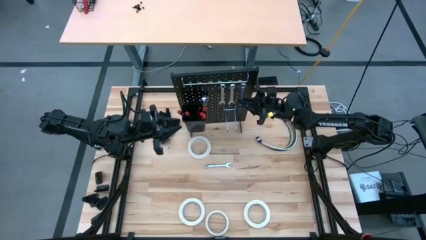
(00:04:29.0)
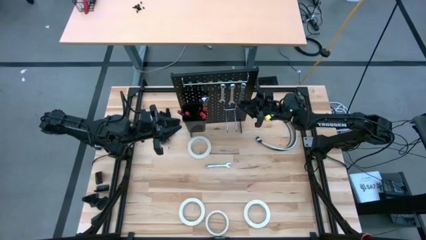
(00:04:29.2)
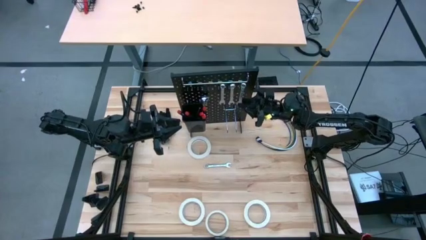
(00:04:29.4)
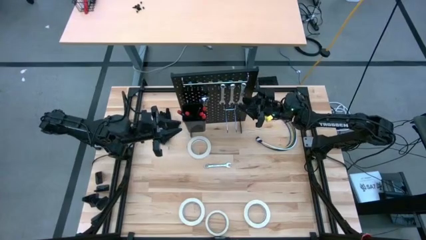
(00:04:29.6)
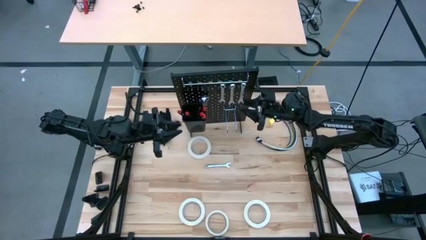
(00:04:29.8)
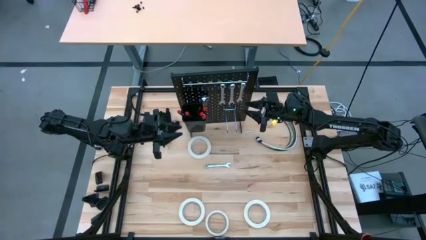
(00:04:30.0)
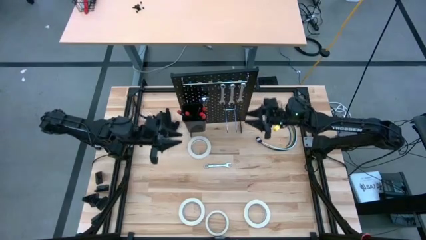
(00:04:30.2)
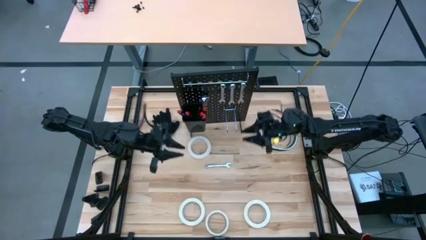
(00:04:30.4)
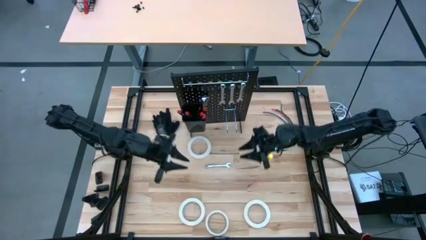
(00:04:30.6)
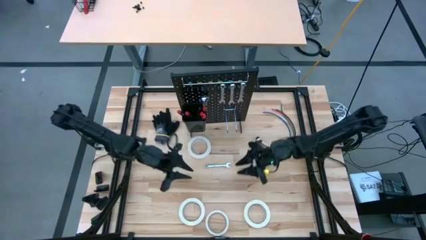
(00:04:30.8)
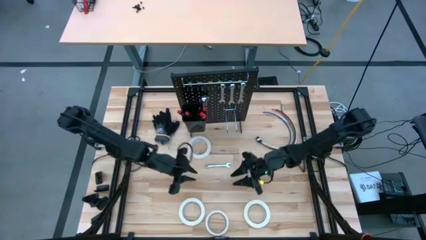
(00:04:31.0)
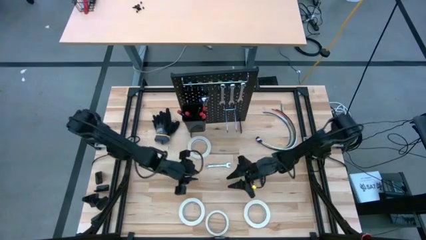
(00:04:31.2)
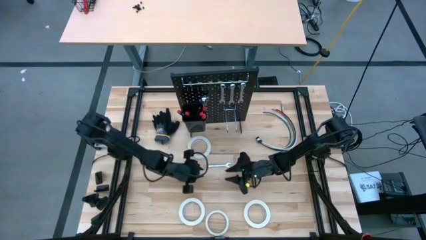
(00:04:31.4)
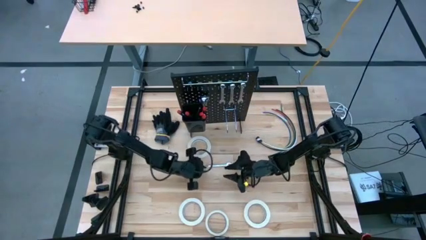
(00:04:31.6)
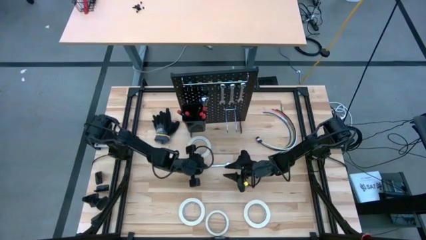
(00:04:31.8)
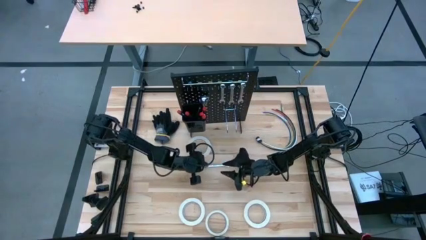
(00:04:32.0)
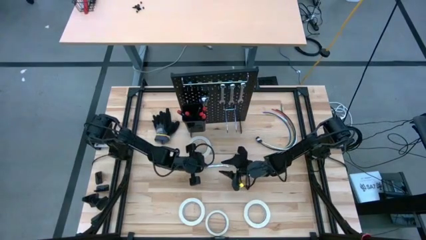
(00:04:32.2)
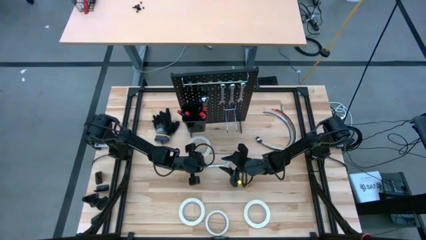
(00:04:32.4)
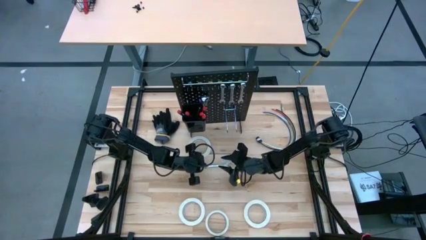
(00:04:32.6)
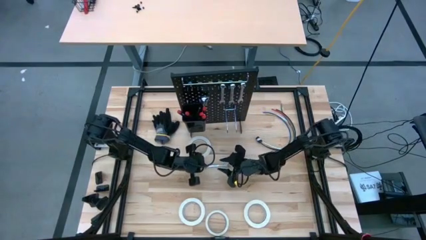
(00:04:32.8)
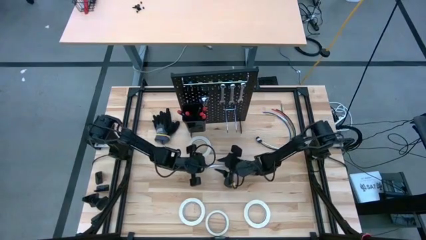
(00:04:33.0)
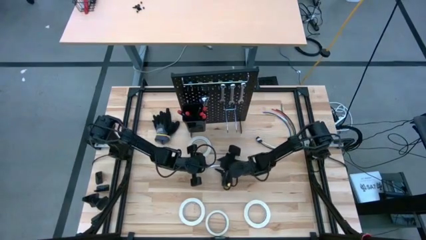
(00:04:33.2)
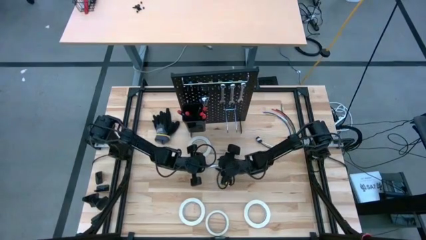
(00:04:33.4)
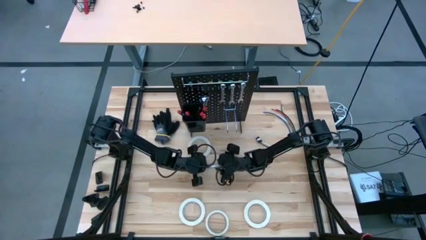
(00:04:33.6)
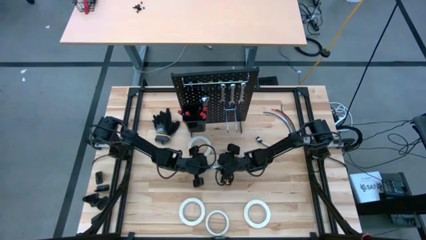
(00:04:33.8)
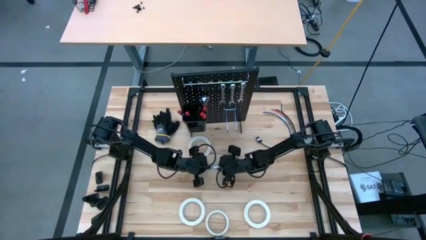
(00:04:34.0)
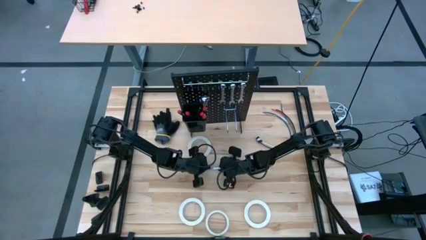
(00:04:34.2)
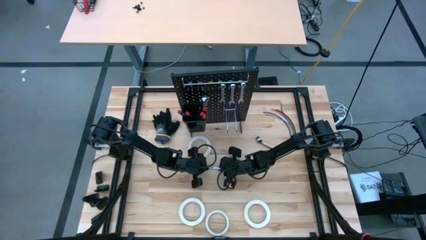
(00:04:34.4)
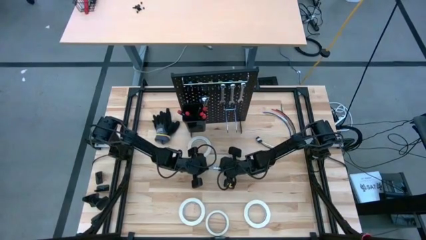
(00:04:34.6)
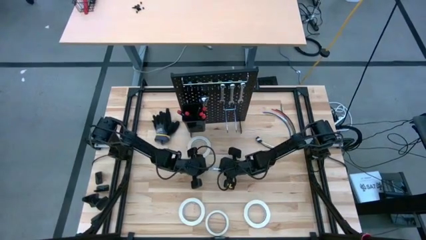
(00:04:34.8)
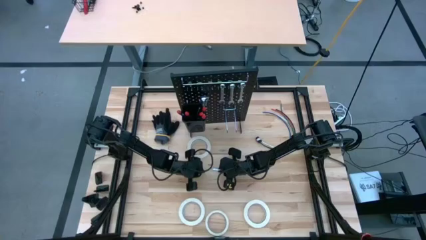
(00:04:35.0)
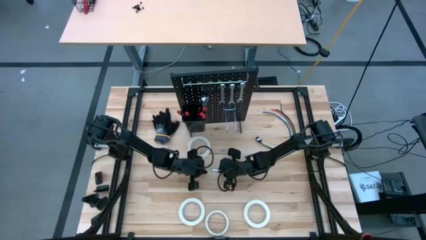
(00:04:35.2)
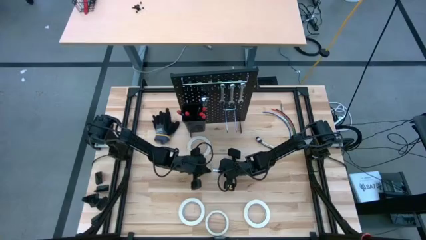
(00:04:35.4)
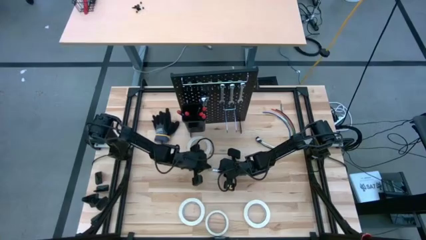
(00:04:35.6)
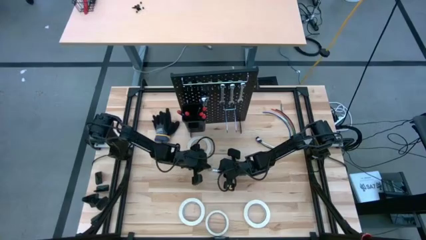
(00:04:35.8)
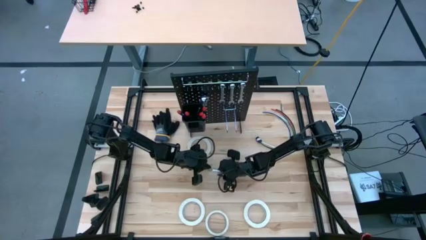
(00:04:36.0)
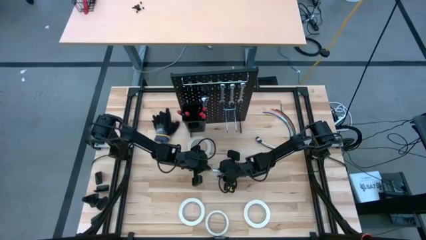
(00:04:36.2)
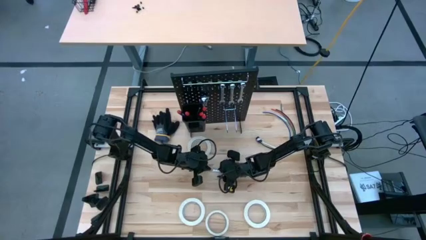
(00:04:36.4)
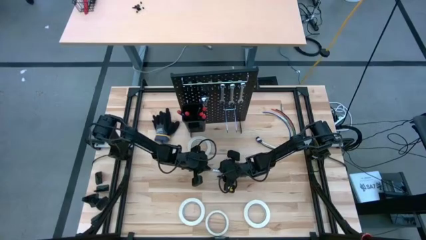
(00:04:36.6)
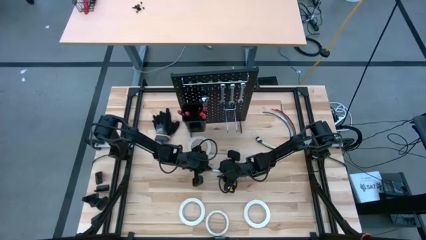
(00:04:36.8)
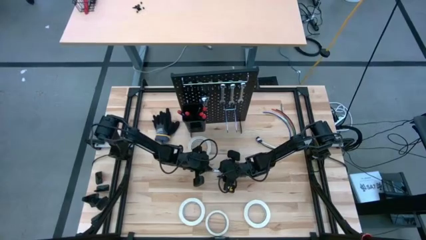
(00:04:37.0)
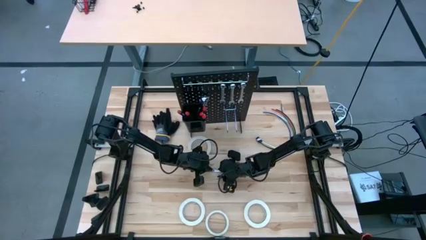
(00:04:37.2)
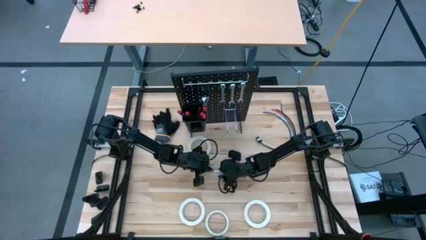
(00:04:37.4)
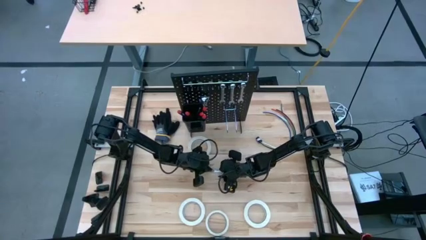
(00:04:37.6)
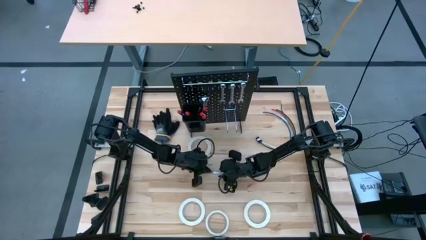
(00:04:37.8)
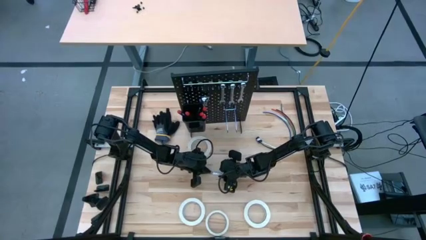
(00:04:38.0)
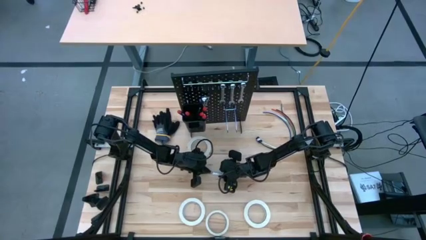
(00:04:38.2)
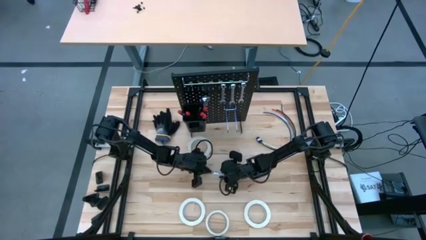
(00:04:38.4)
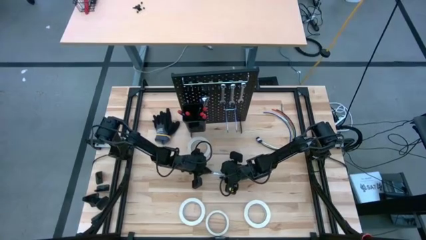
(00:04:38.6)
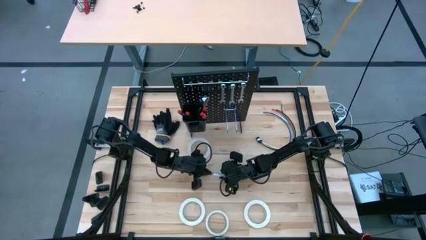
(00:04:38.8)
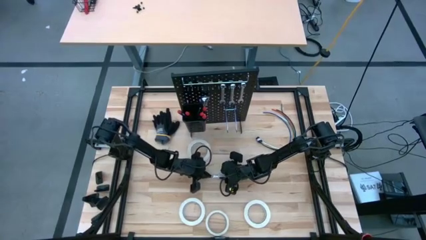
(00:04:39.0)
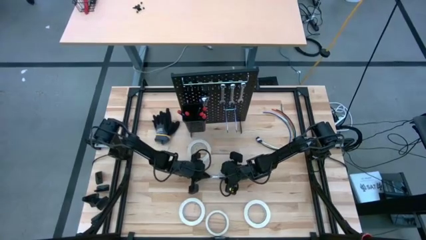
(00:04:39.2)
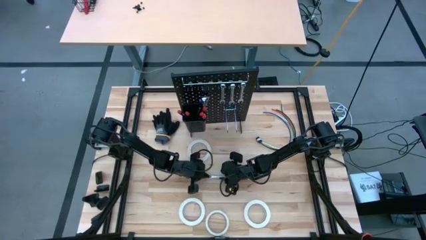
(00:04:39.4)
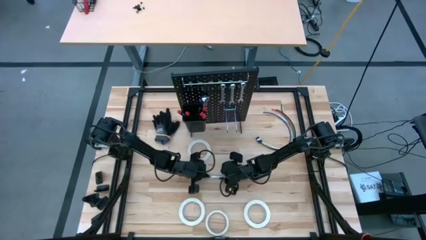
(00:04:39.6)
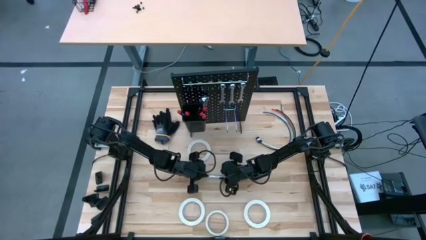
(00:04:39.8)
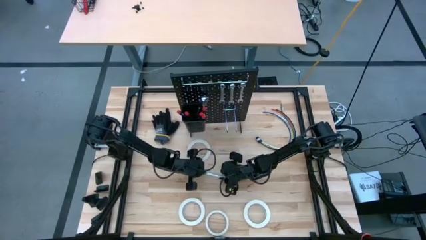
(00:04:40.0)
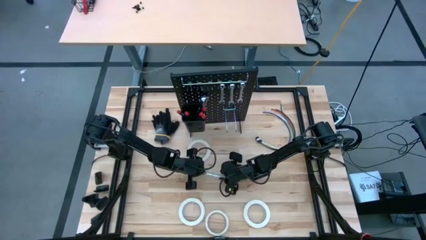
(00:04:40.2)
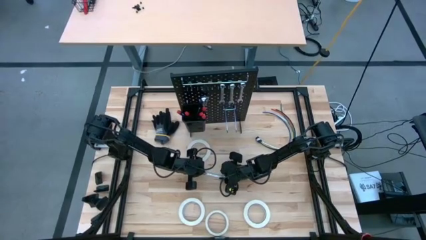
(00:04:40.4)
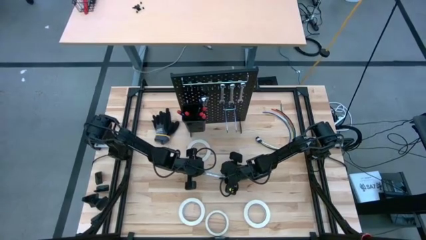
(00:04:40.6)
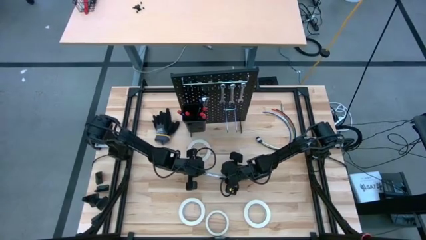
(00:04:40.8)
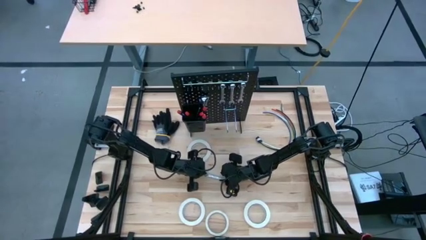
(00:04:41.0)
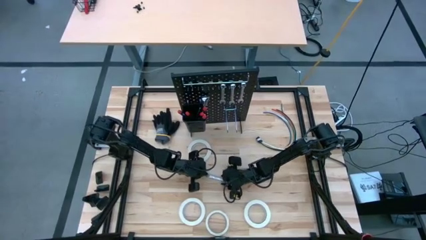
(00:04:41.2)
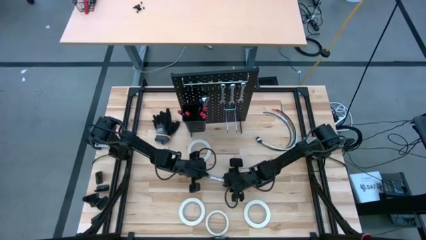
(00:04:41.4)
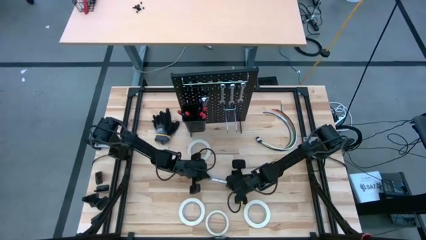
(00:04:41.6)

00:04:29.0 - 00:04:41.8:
Task: Hang tools onto peg board
Hang the silver wrench on the peg board

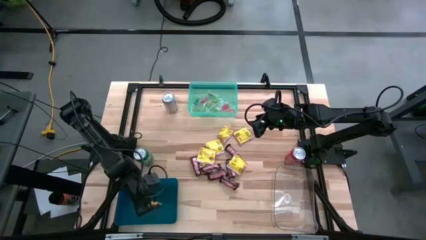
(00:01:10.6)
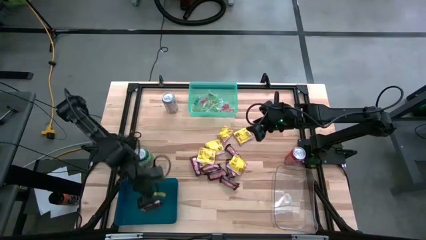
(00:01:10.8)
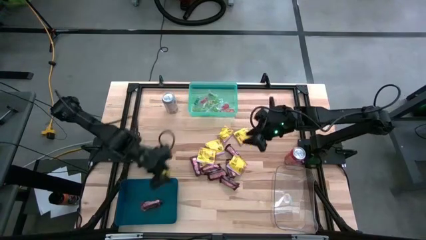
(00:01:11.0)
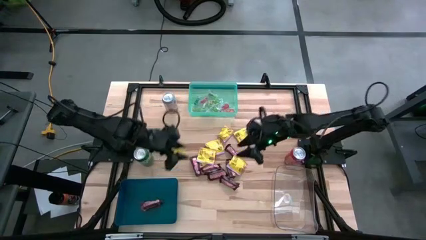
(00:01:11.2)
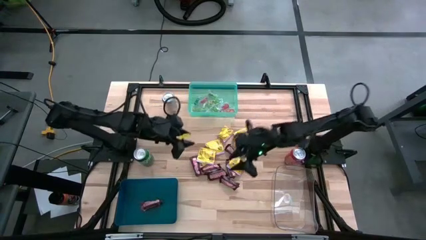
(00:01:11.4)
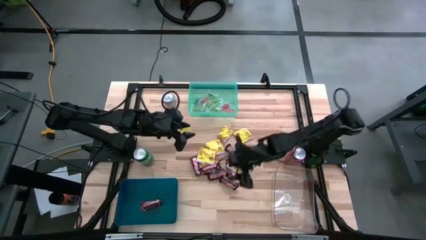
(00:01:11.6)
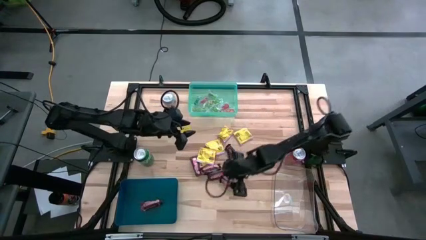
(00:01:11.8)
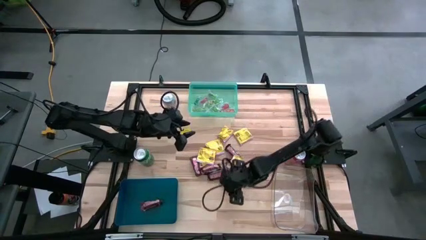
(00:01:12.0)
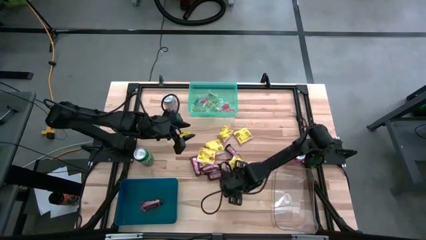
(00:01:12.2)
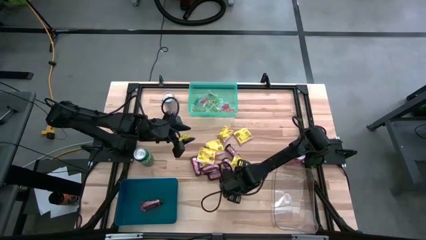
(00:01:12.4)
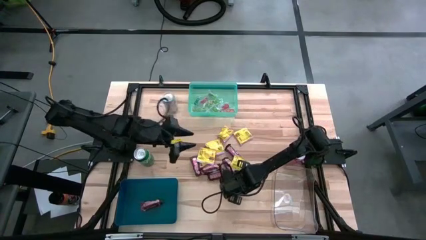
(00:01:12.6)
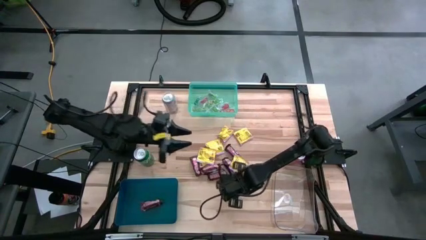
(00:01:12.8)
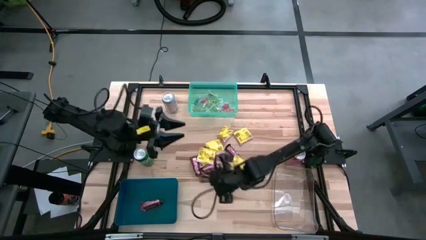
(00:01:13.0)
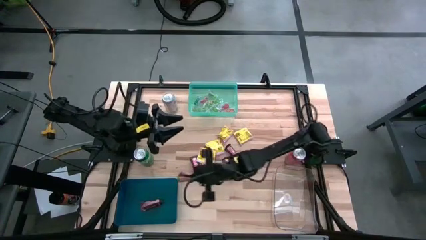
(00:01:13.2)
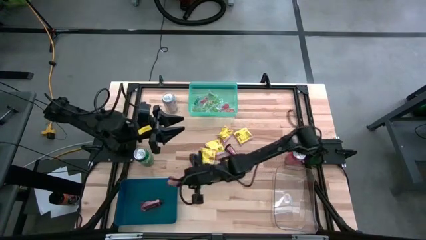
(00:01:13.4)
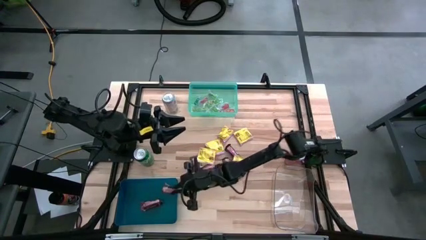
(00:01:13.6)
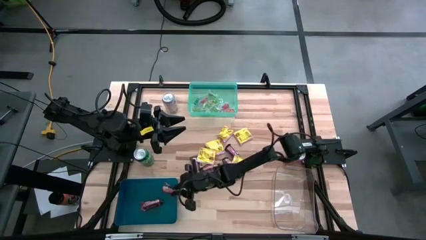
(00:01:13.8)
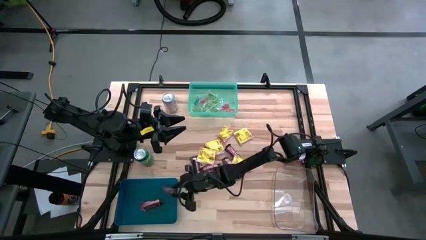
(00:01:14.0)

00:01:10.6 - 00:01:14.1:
Task: Sort candy
Put the brown chocolate into the dark blue bin
